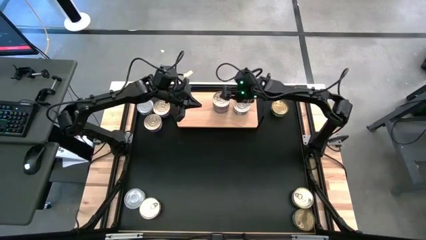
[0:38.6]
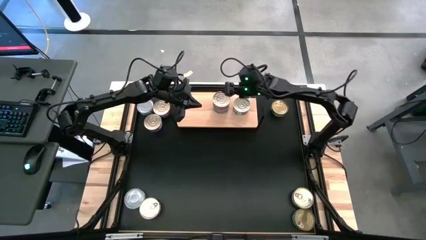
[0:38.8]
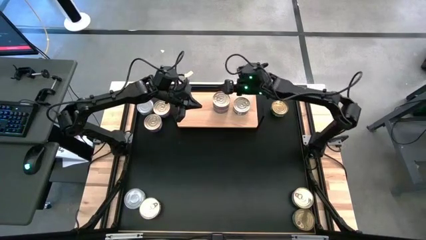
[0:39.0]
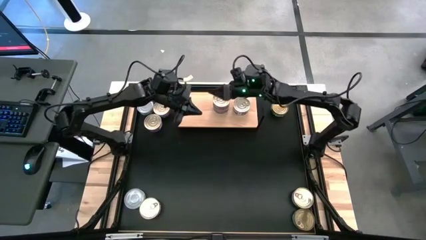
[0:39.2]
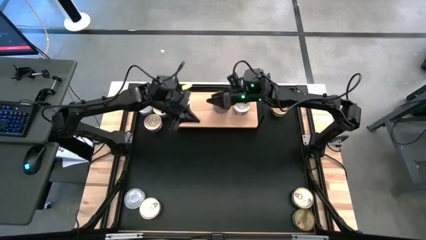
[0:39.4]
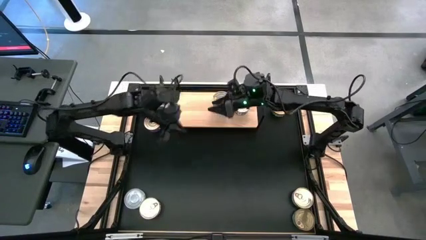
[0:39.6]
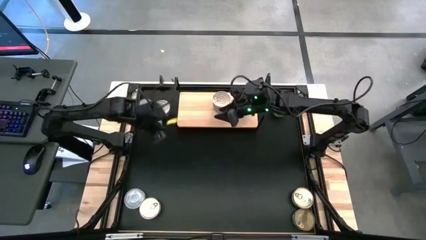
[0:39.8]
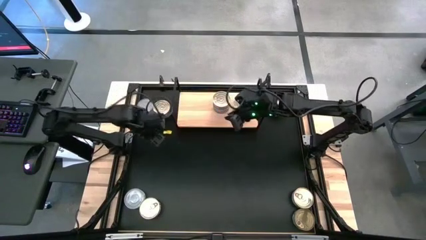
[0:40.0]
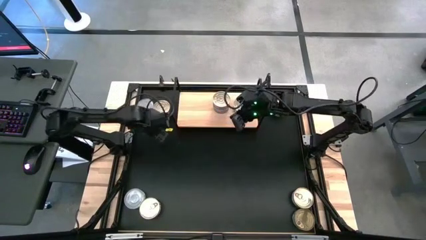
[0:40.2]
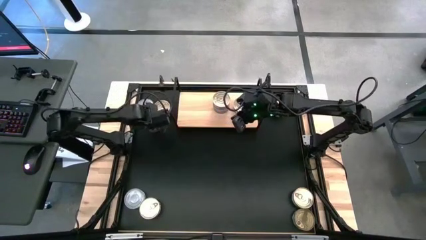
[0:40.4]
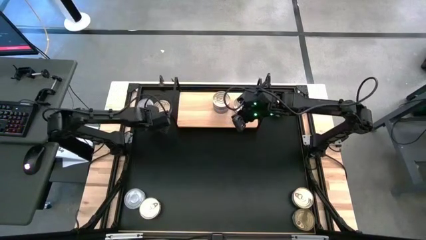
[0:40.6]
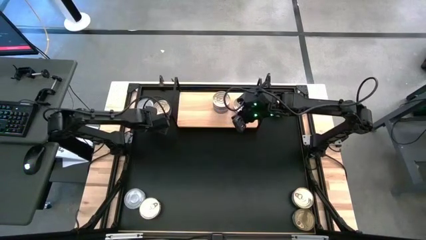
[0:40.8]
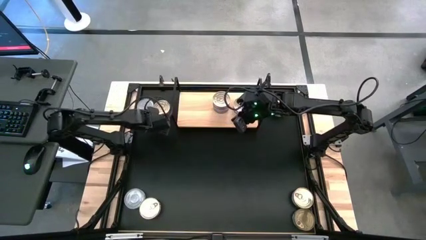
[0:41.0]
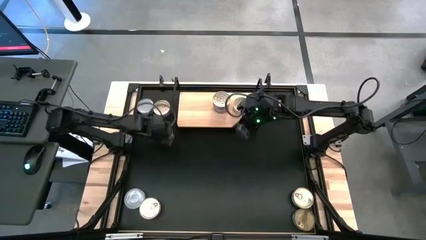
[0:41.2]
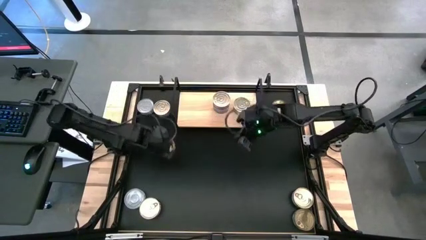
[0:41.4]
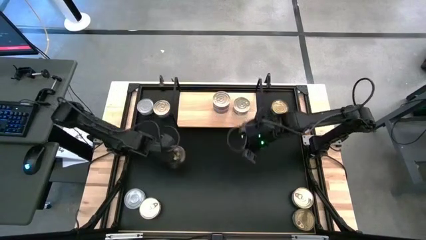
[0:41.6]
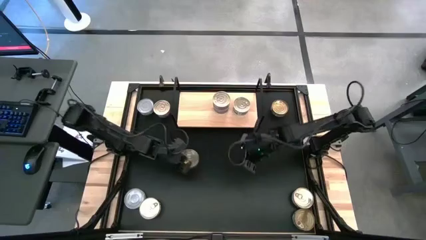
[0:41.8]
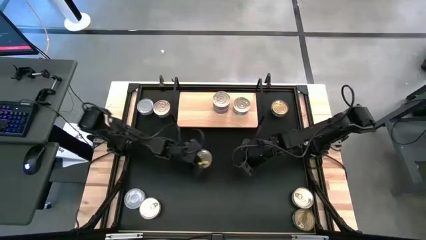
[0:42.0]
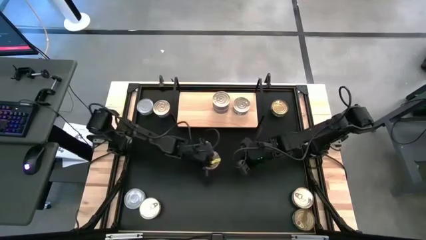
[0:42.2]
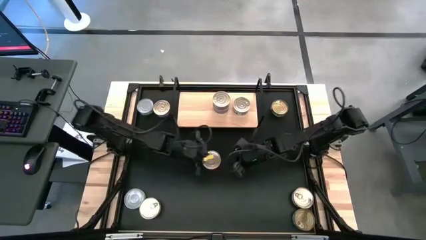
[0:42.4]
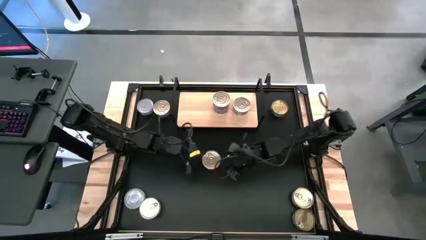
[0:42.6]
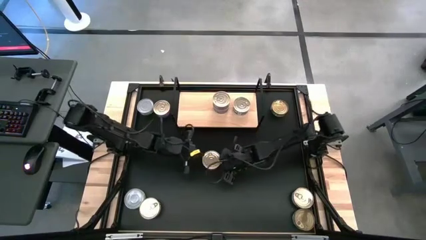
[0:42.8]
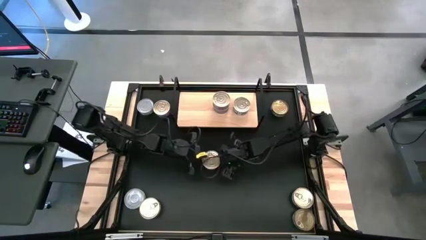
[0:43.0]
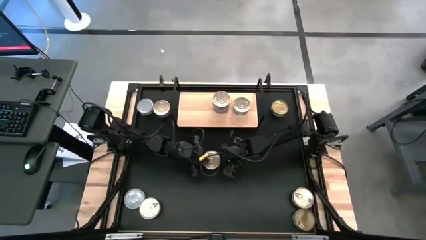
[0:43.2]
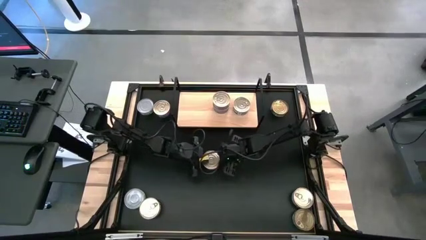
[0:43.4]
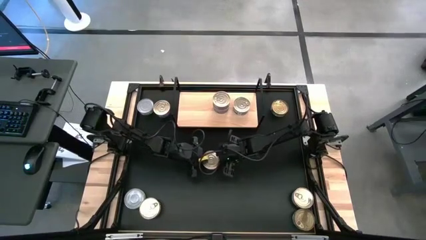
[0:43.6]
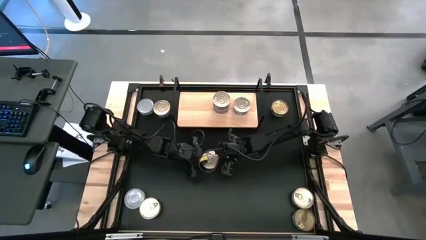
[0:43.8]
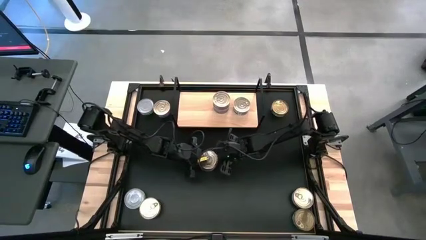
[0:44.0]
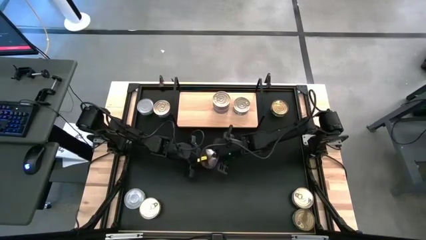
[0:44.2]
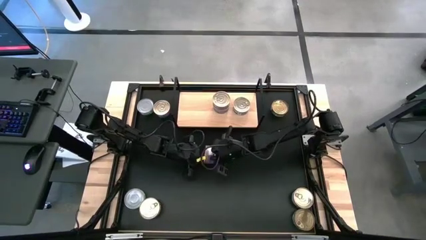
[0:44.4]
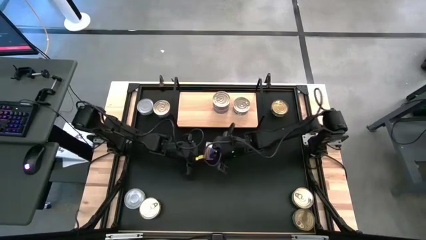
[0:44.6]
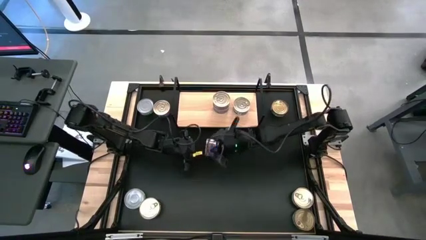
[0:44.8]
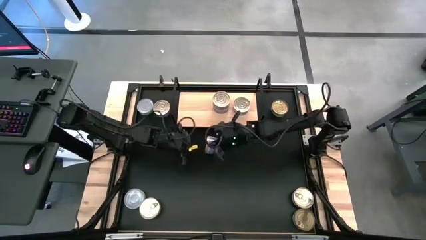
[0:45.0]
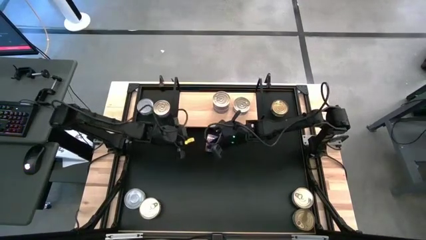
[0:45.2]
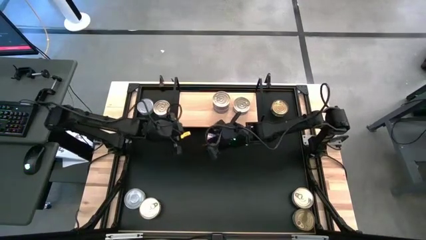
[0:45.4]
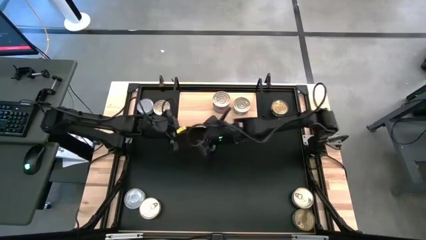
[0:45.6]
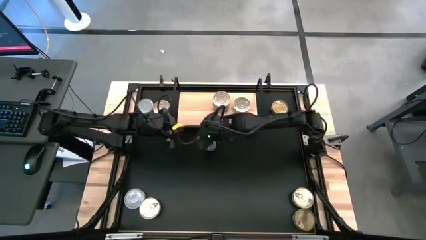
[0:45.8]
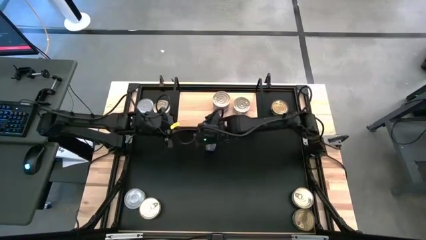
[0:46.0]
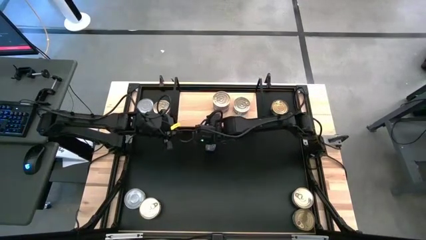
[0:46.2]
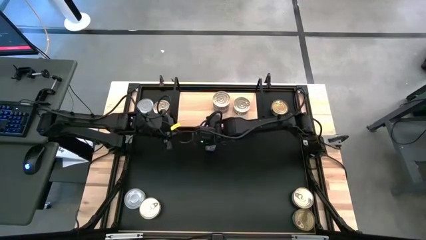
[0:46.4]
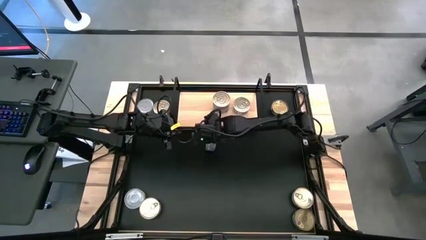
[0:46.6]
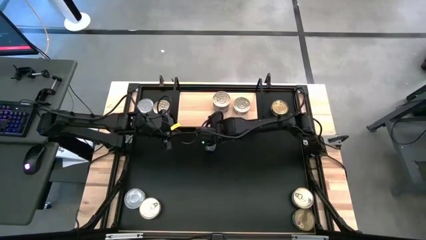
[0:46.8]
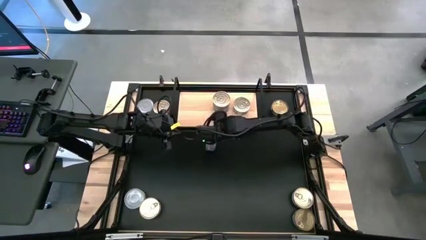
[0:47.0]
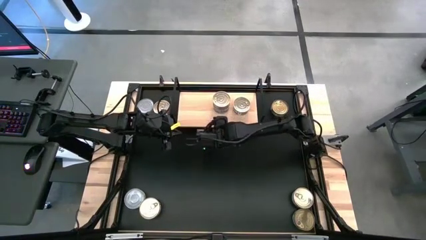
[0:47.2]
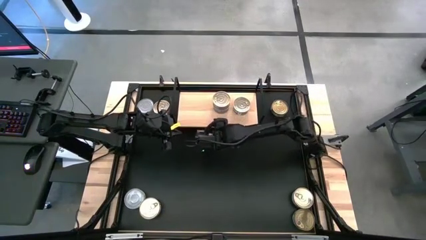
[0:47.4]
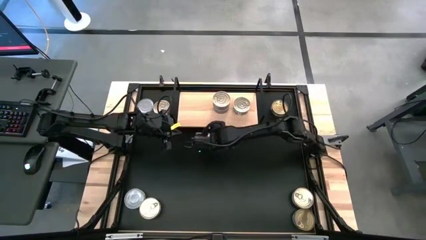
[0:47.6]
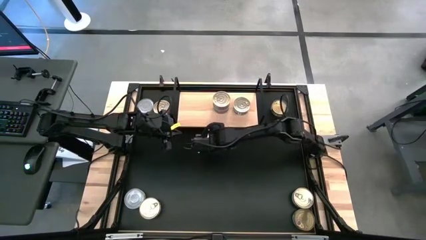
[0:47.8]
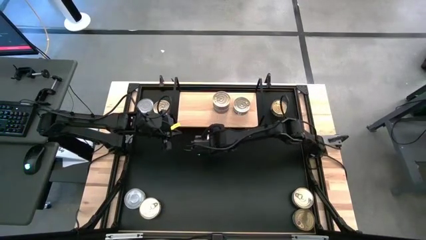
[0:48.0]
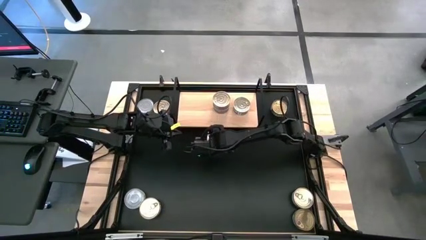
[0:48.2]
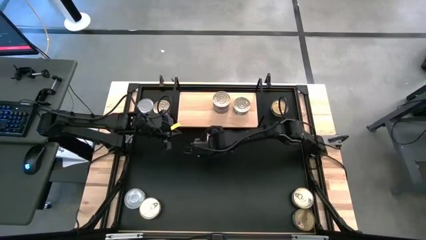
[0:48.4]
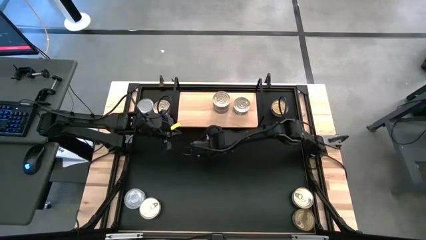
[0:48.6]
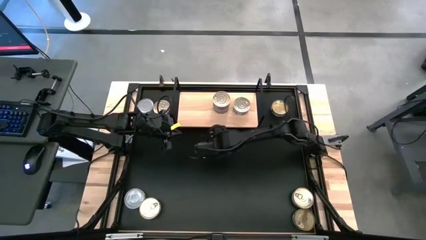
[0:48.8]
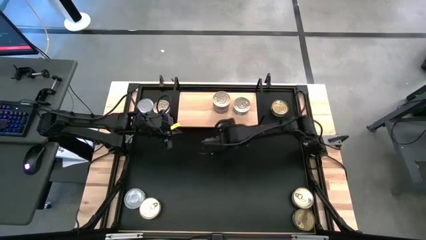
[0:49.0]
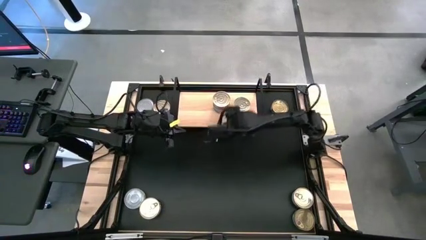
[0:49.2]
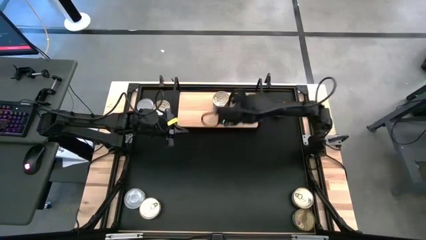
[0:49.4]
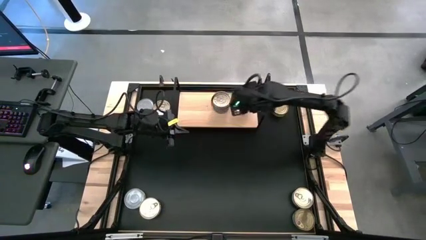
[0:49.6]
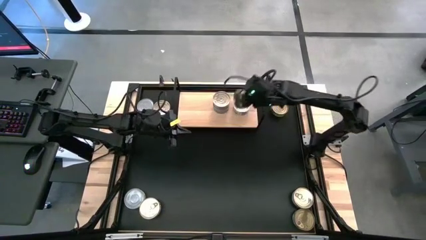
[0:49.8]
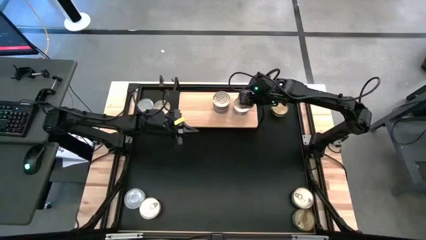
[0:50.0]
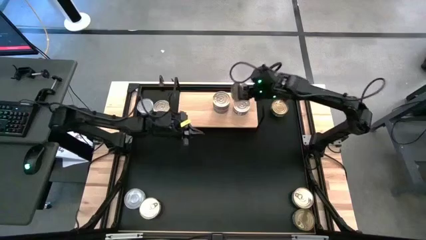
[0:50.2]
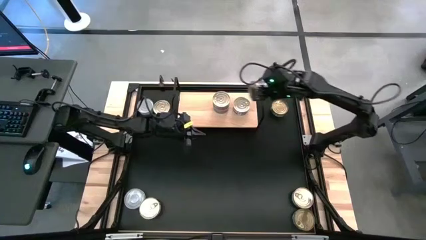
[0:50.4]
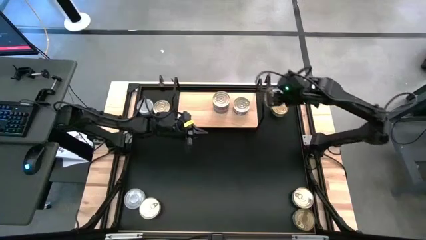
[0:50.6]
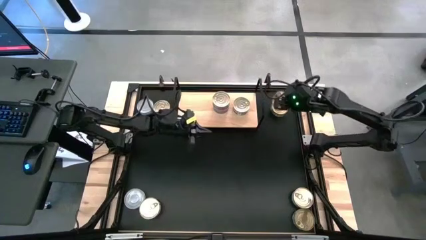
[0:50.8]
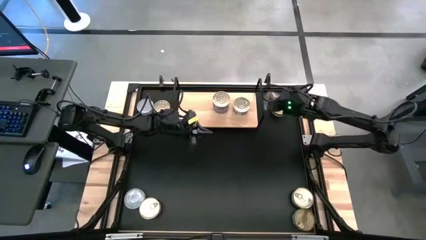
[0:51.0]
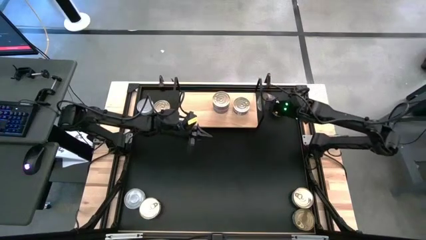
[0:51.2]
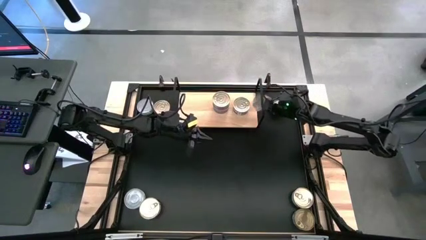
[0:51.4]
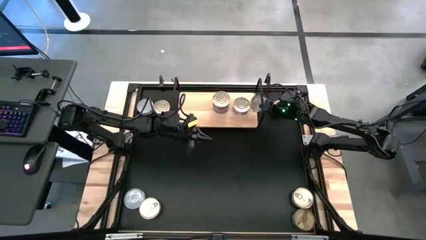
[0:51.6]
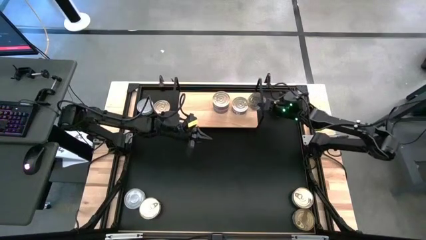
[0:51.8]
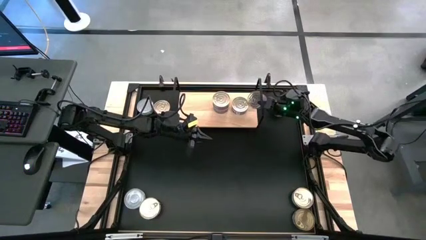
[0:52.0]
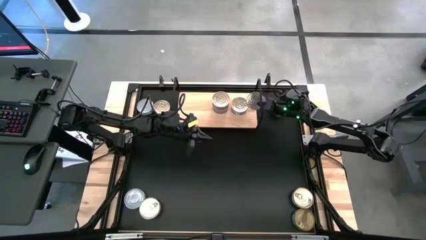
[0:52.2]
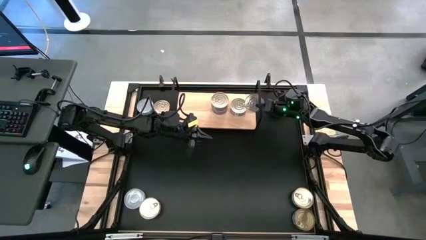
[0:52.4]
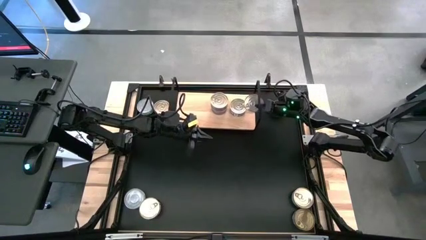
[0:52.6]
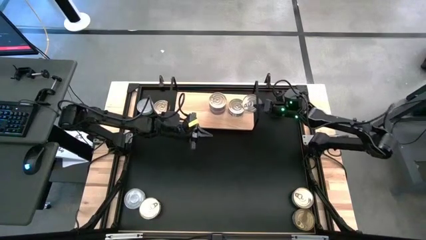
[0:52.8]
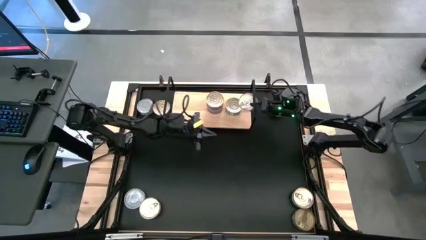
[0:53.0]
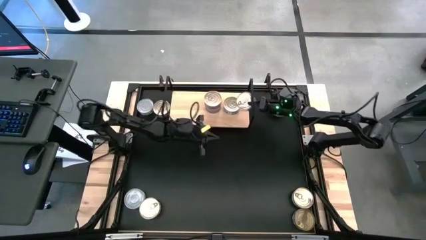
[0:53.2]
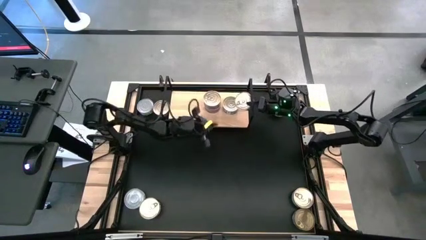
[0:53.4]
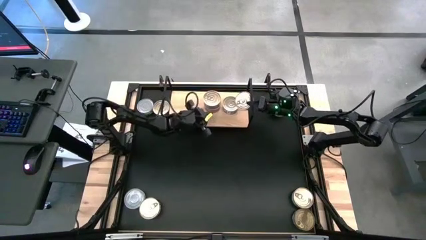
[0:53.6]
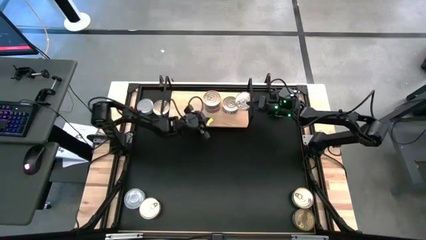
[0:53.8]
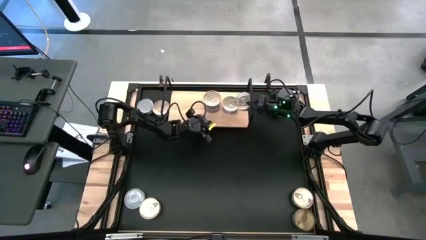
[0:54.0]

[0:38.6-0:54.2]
Task: Stack canned seafood by type on shelf
Stack the left blue-pink tuna can on top of the other blue-pink tuna can on the shelf

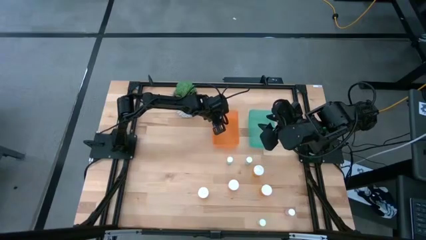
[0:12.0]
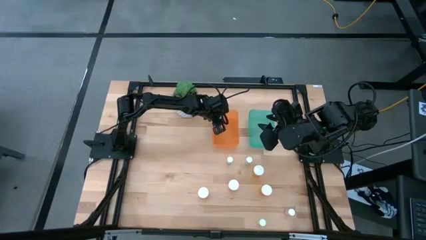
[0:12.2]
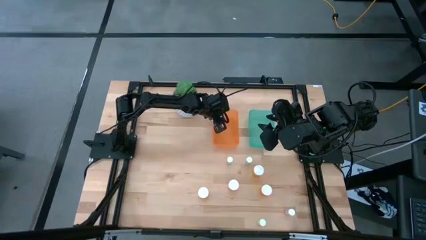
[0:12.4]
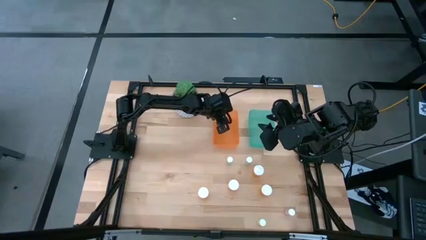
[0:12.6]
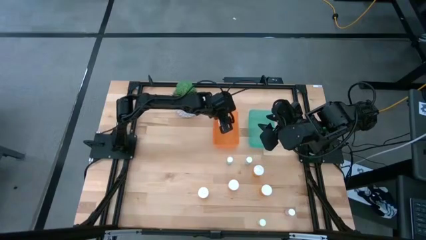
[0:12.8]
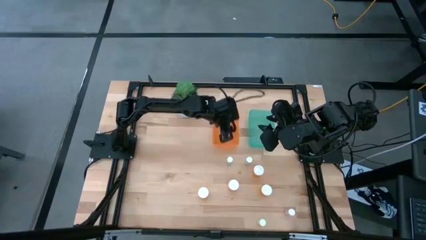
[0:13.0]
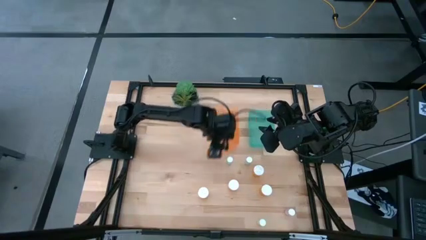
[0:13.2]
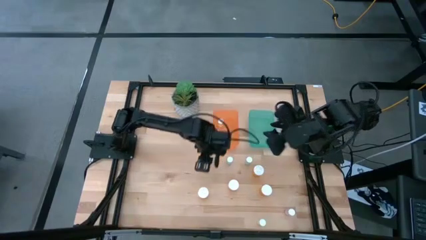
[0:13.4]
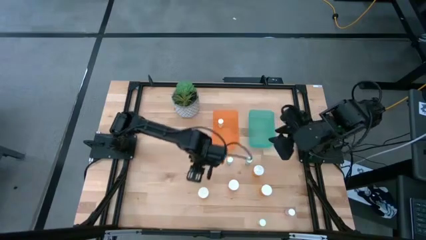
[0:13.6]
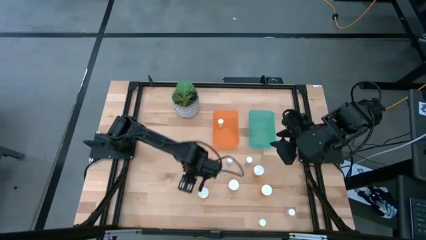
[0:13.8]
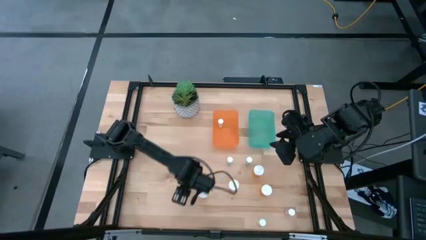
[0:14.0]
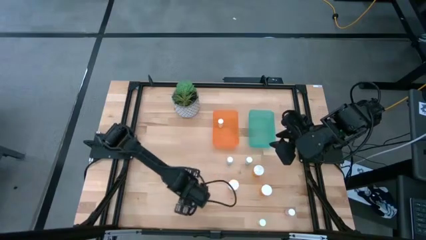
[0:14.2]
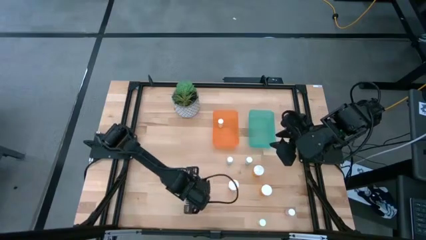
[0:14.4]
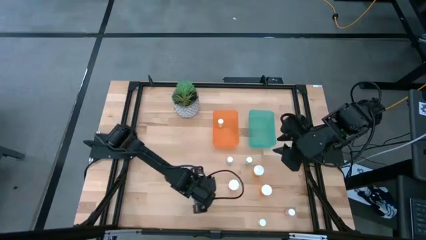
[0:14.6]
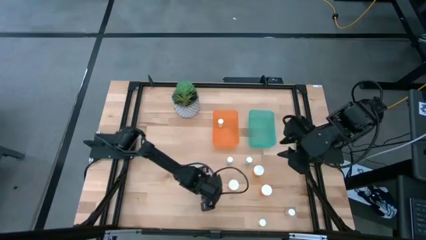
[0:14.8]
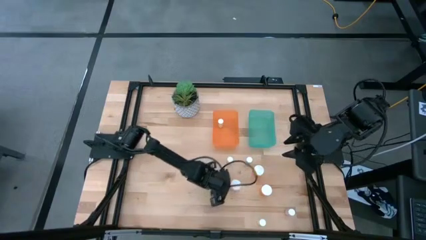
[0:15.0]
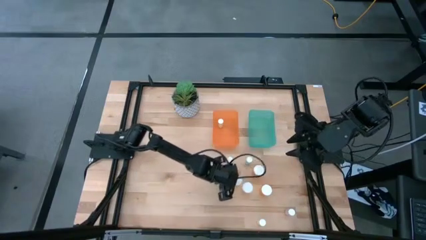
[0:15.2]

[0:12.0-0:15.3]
Task: Pick and place medicine bottles into bin by pill shape (circle, oval)
Move the large orange bottle to the middle left of the table
